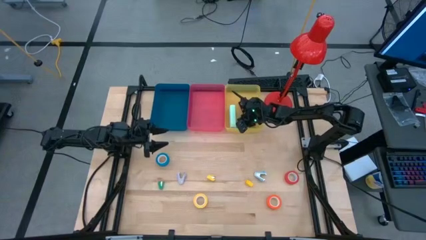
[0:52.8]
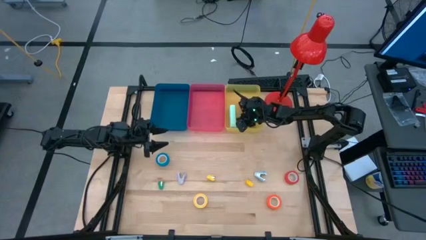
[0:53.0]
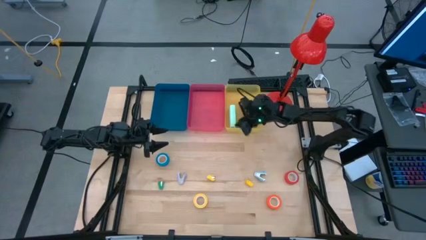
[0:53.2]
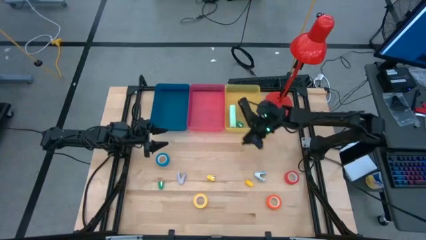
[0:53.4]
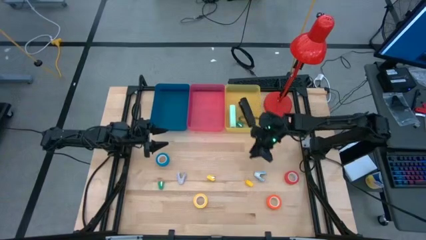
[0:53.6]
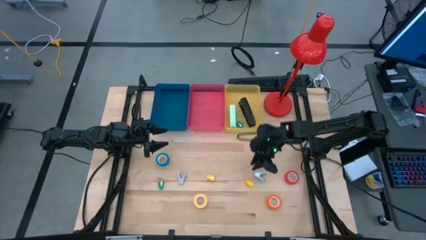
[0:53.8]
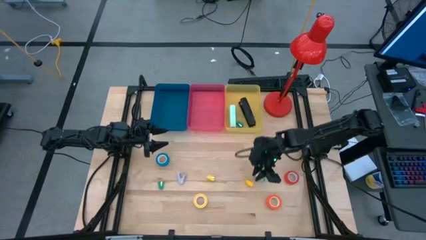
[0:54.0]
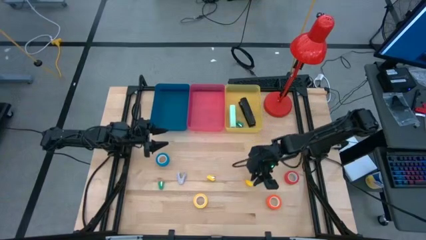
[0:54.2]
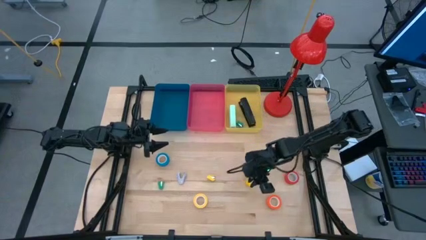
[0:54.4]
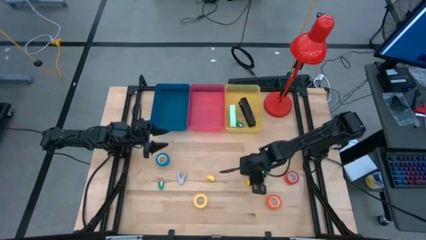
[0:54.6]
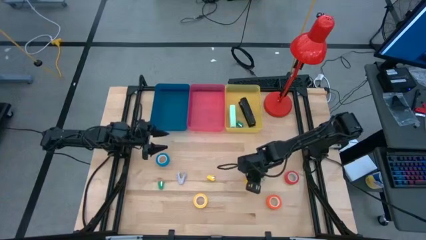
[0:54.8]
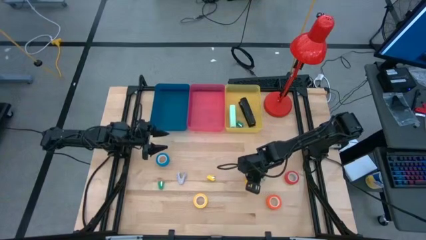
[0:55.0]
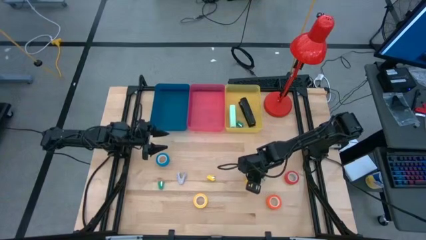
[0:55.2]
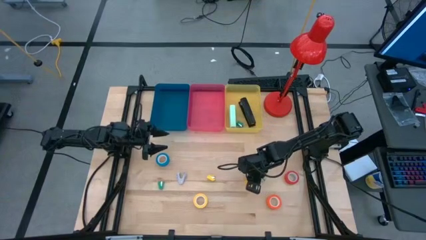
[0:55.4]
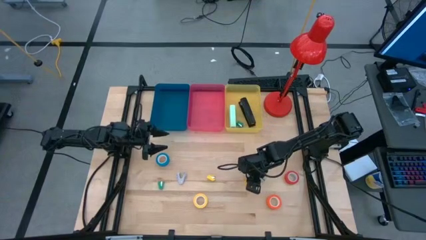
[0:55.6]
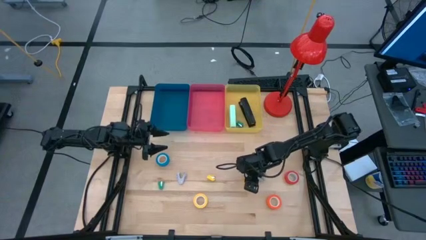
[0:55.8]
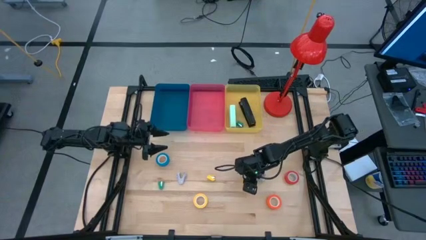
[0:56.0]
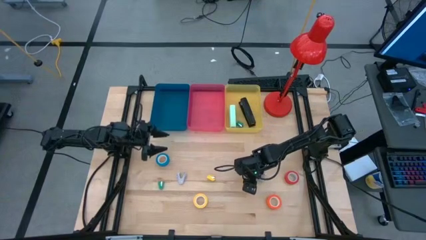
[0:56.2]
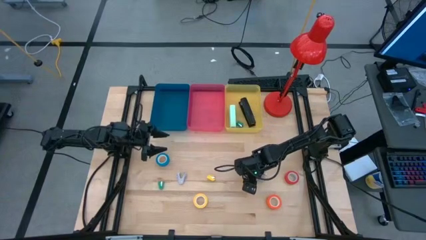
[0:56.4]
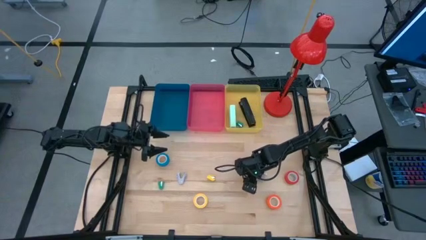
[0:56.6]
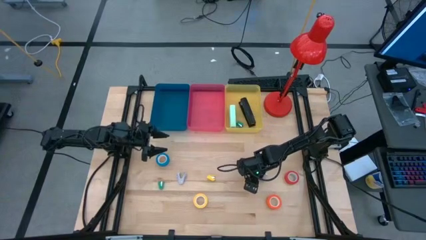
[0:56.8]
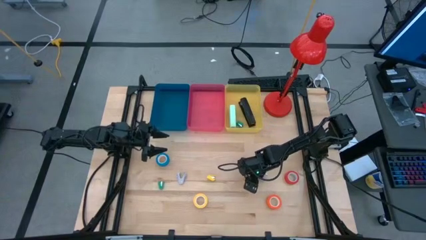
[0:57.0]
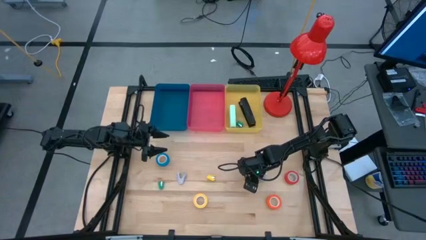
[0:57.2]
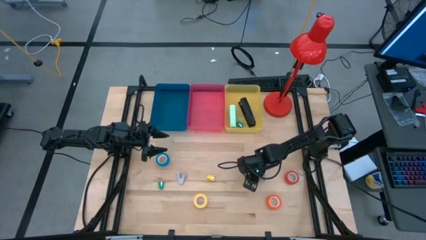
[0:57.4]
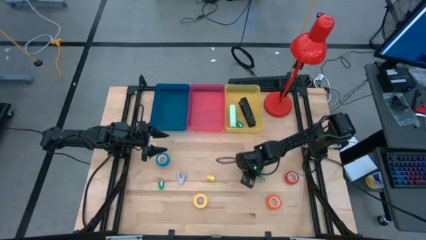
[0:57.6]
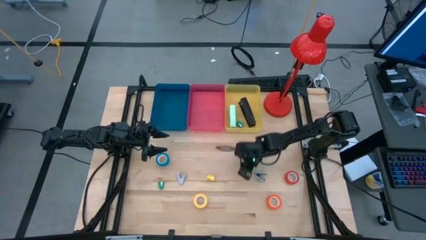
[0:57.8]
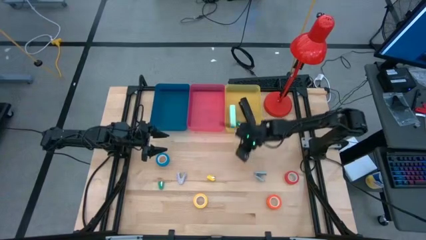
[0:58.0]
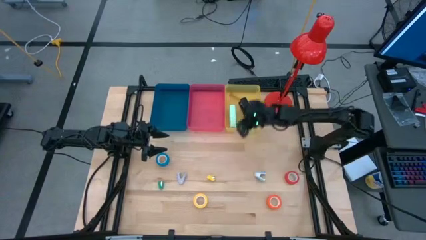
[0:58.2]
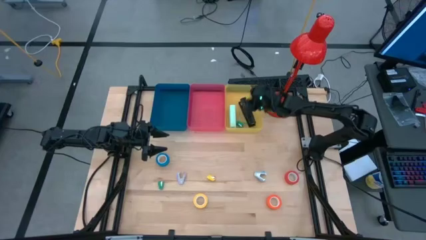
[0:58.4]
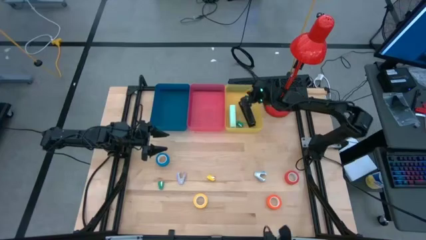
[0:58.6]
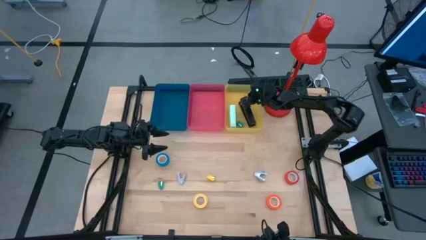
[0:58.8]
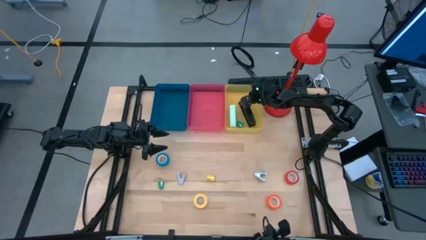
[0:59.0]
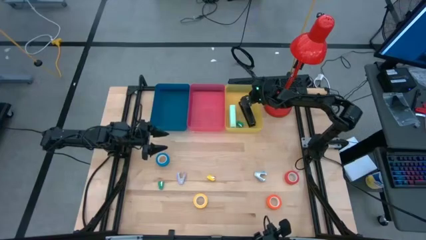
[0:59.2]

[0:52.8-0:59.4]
Task: Pick and place Stapler, Stapler remover, tape
Put the right small yellow stapler into the yellow bin
